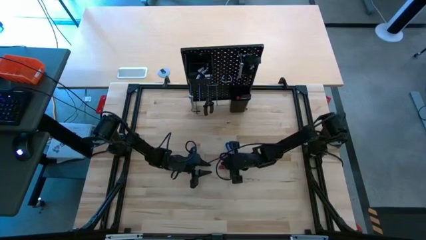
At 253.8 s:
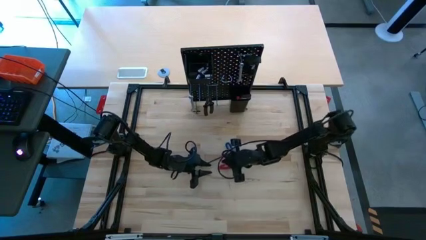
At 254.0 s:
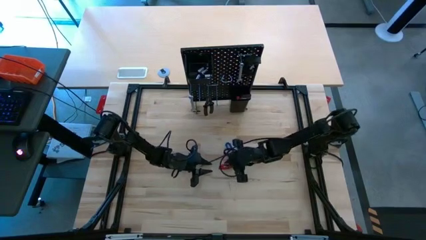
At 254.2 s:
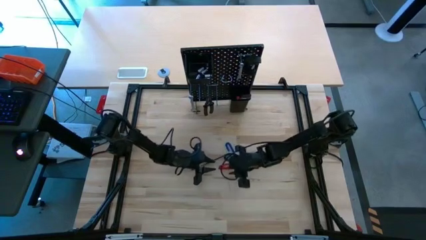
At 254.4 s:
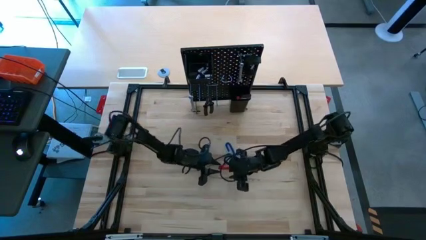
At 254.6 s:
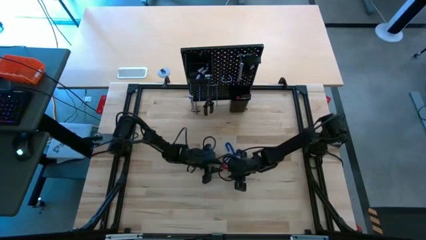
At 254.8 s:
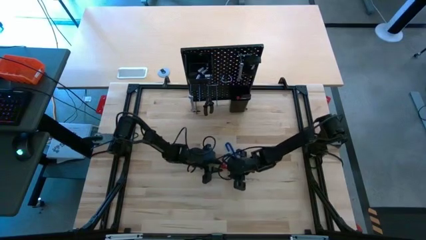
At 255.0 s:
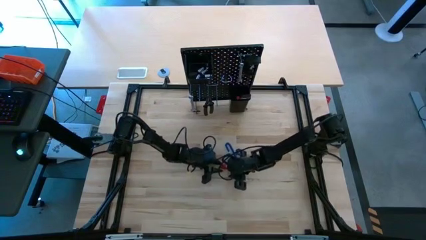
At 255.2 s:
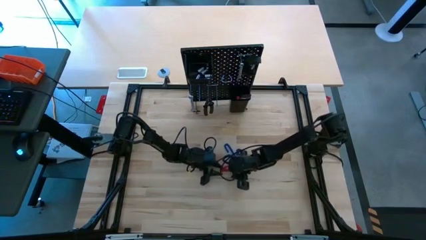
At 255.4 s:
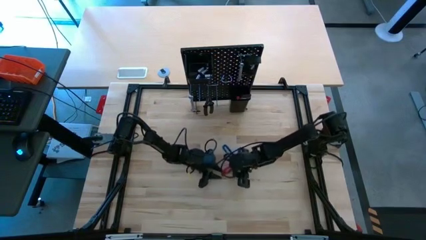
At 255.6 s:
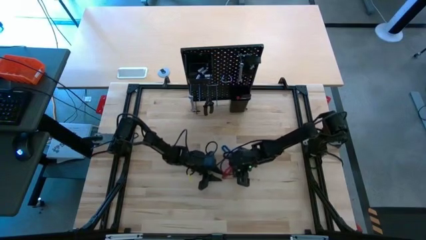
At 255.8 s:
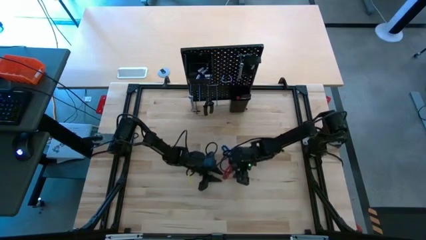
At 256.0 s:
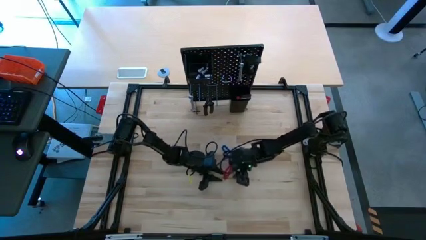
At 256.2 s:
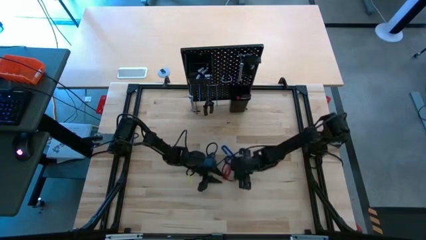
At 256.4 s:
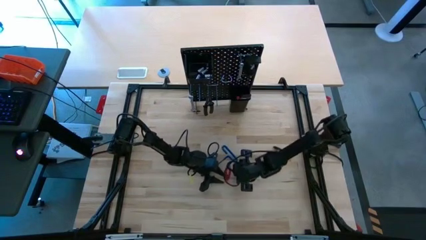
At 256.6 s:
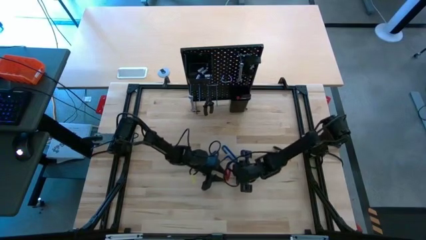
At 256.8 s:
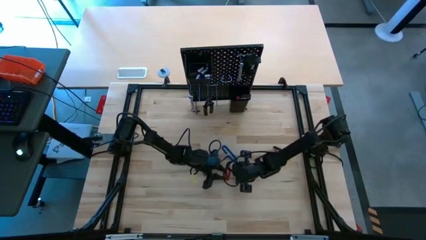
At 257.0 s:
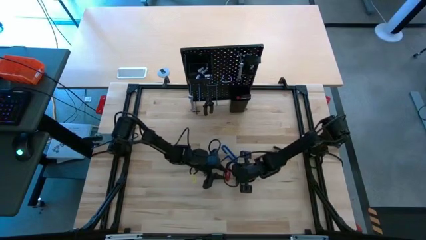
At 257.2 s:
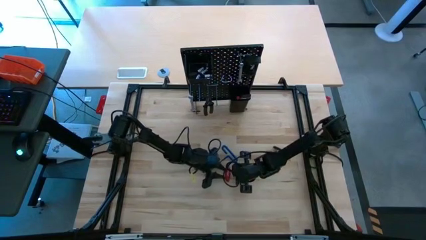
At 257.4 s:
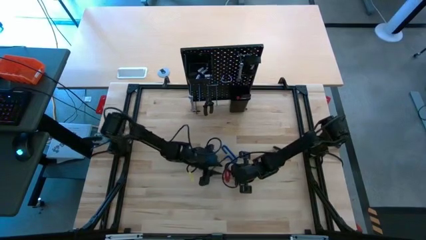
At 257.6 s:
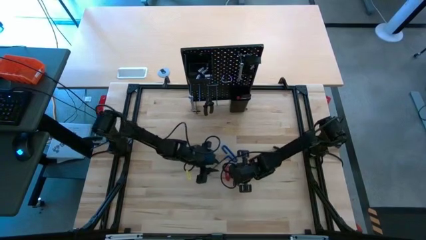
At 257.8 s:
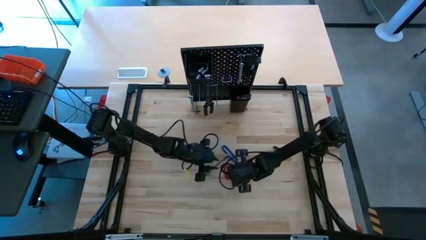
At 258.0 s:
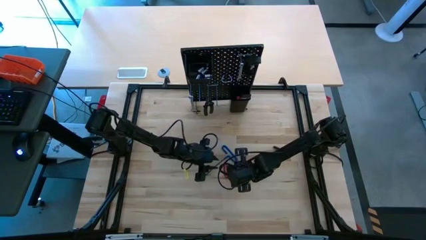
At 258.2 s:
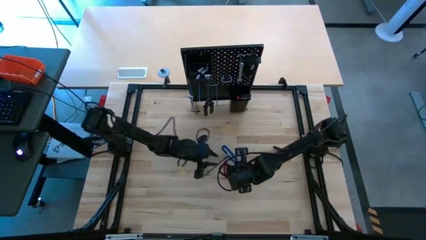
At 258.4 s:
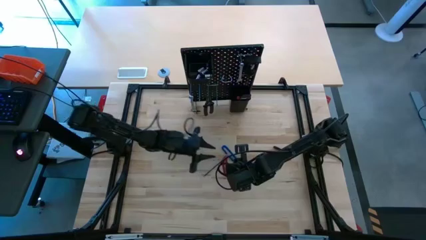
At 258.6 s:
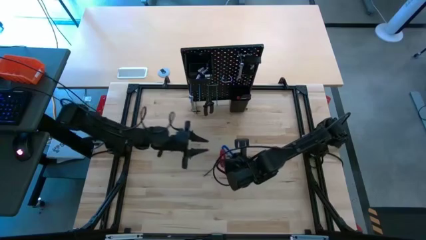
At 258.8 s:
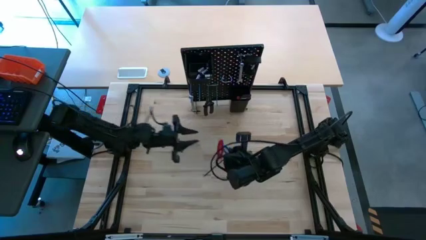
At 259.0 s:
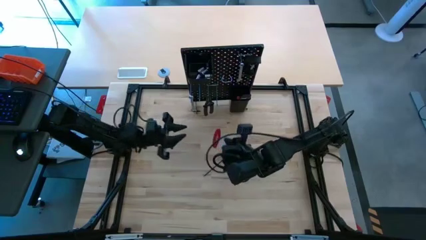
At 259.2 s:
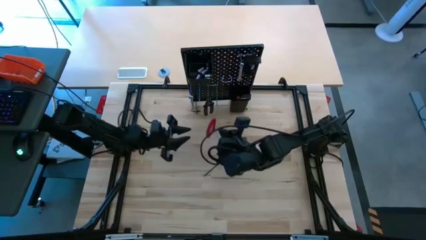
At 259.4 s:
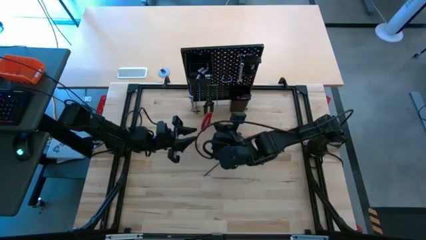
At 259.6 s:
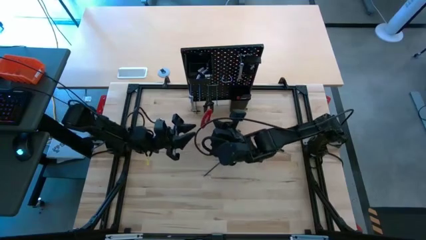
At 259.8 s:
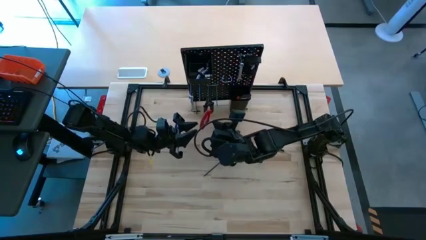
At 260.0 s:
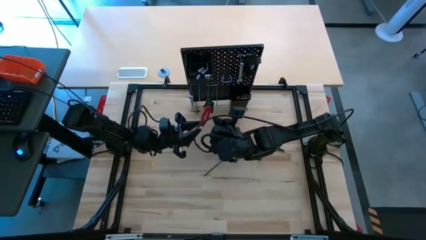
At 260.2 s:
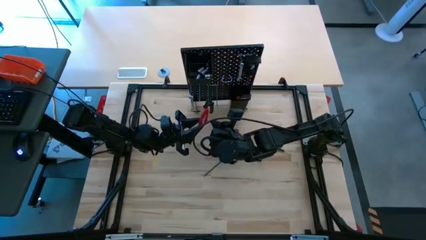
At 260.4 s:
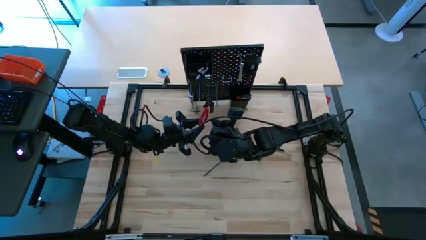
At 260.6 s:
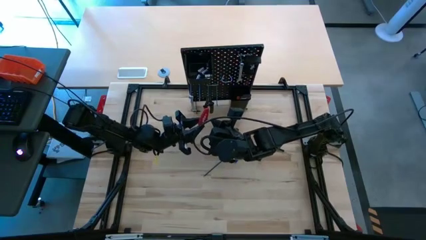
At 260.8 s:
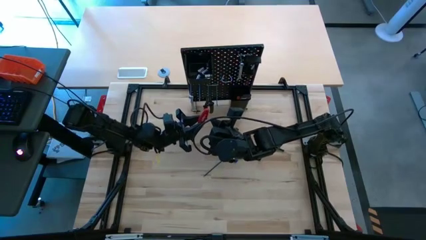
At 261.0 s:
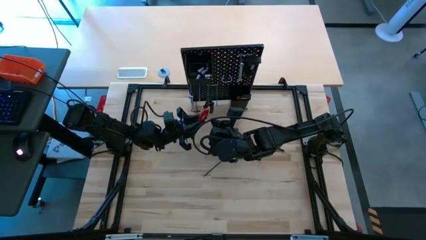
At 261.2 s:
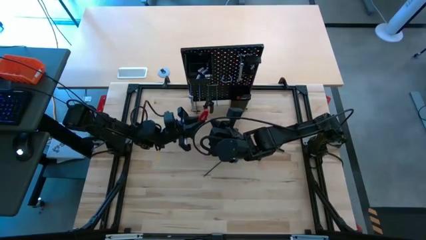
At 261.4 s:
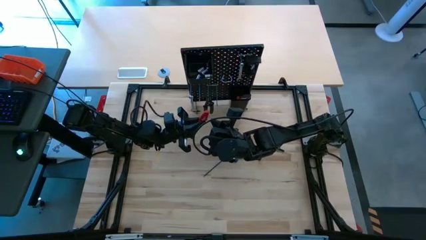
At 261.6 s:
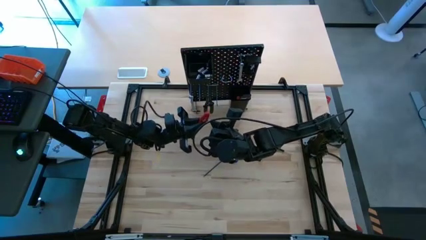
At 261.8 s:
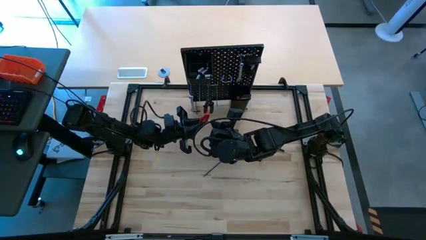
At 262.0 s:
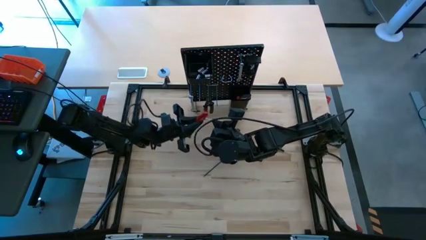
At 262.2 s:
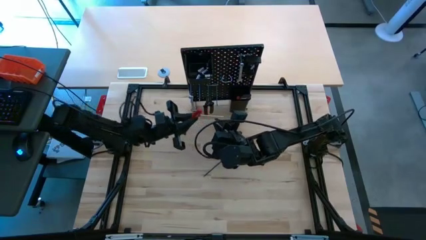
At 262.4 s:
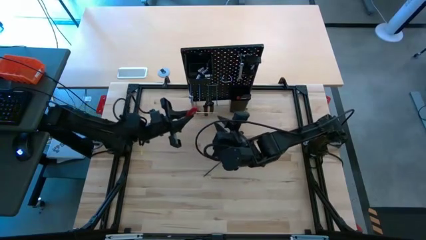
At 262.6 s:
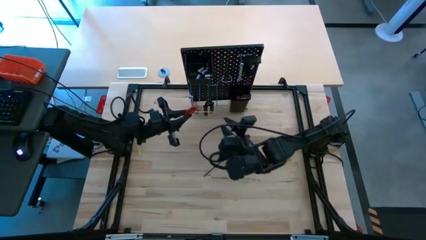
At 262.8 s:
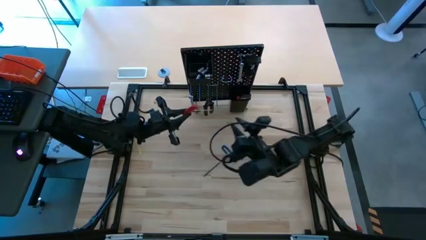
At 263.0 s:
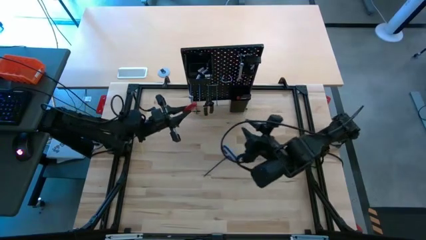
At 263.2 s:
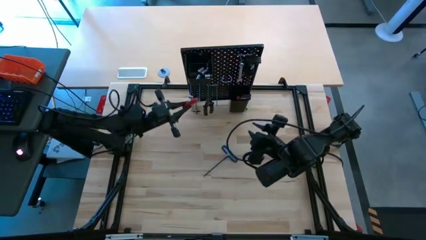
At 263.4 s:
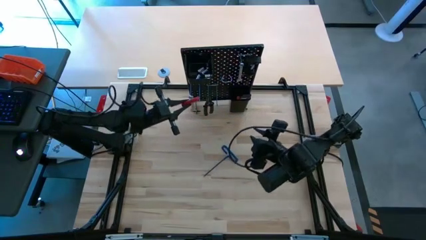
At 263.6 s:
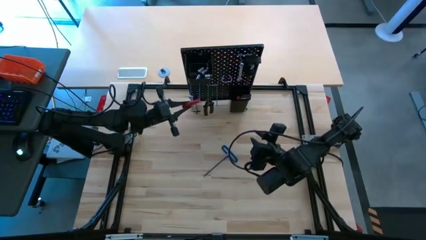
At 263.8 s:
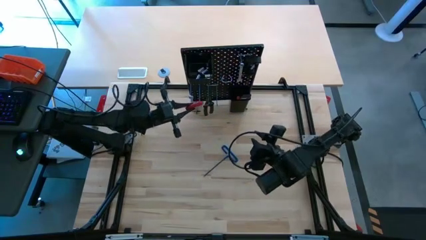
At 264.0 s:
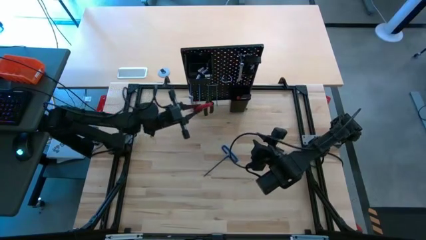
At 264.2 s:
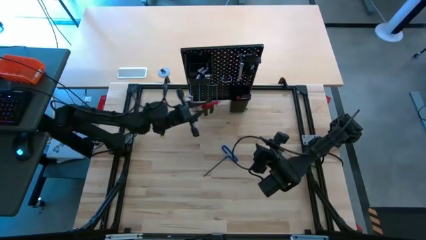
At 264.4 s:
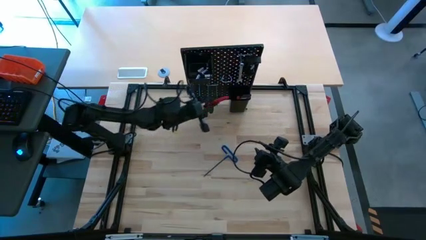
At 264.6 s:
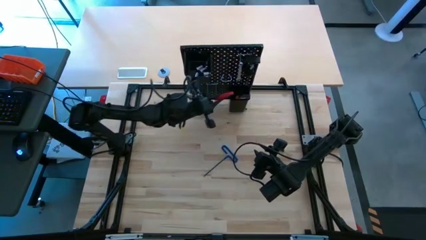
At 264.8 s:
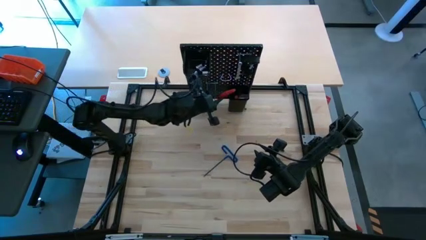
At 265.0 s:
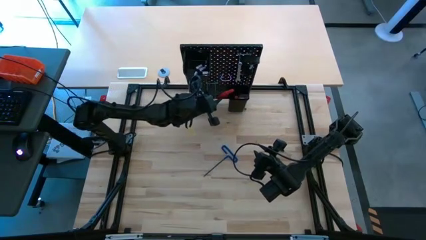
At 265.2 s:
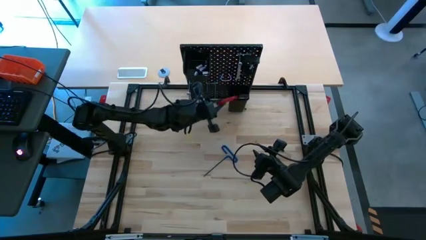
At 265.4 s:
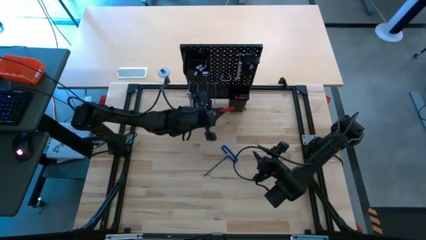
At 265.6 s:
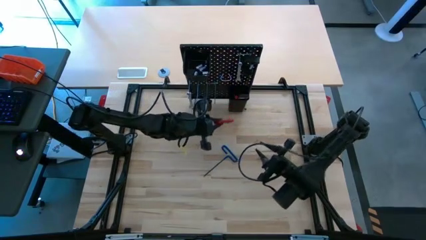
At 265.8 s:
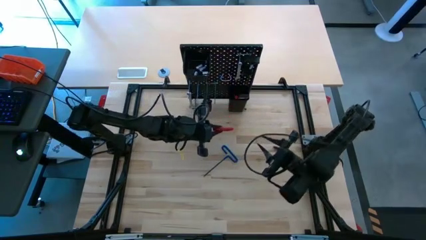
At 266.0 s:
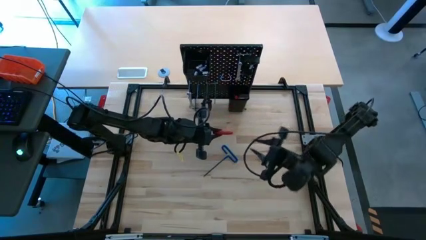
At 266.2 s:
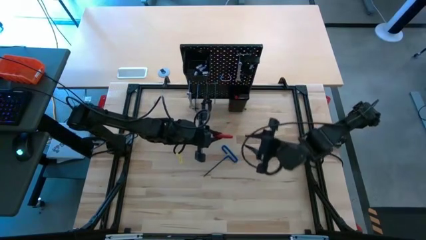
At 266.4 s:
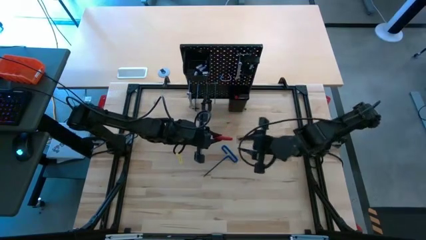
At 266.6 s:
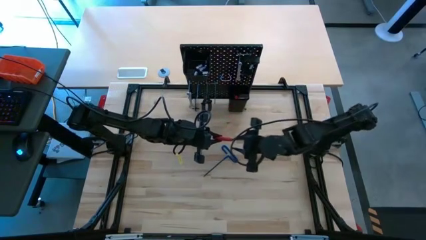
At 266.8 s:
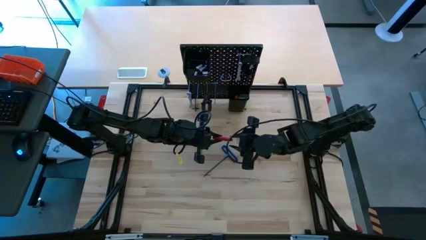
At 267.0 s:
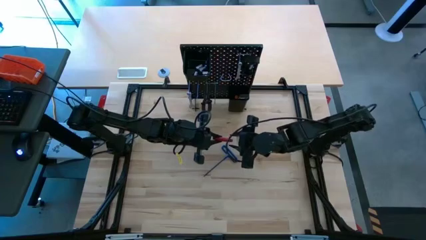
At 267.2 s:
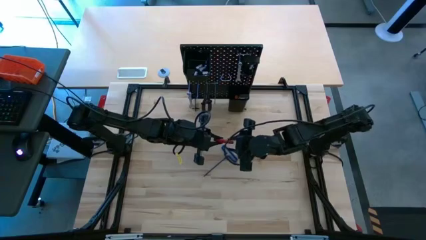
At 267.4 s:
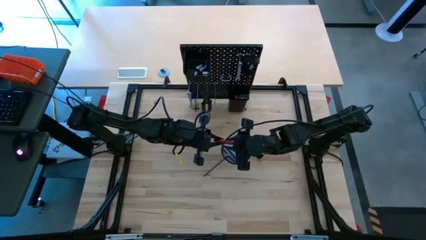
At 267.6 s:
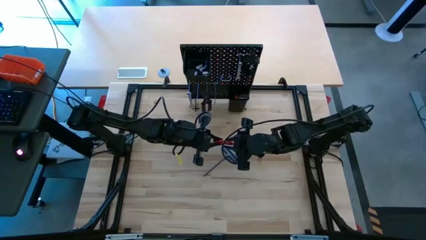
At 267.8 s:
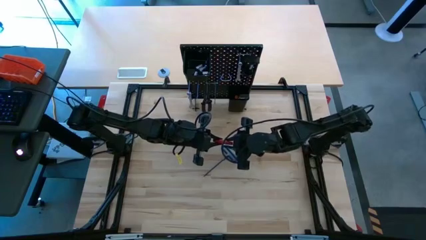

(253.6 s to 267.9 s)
Task: Hang tools onto peg board
Hang the allen wrench on the pegboard
